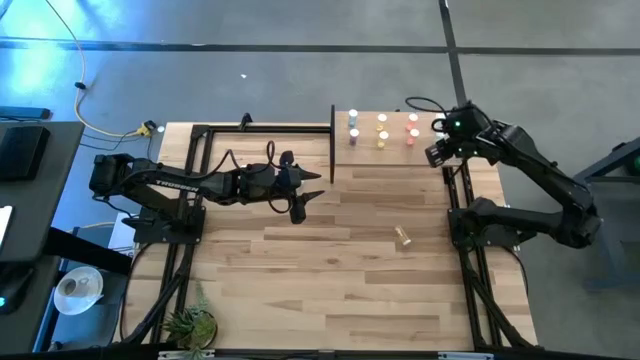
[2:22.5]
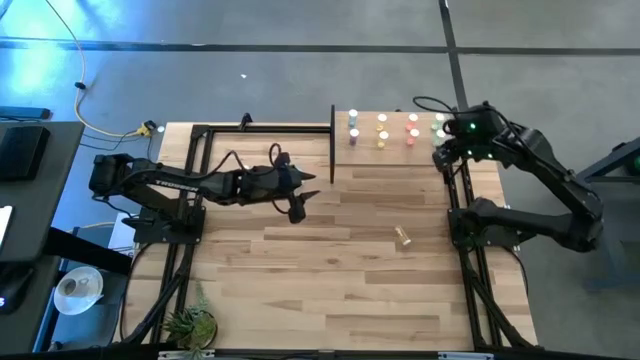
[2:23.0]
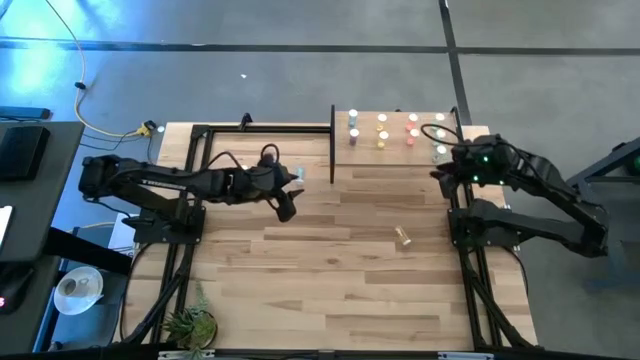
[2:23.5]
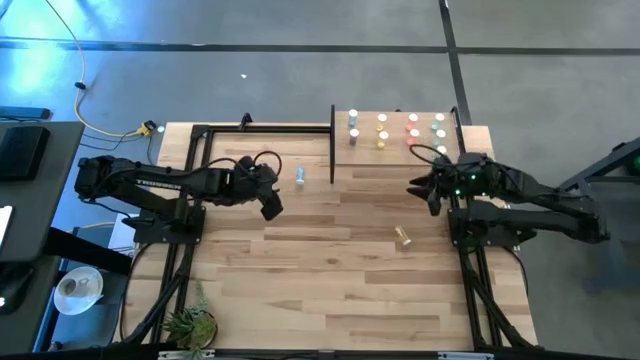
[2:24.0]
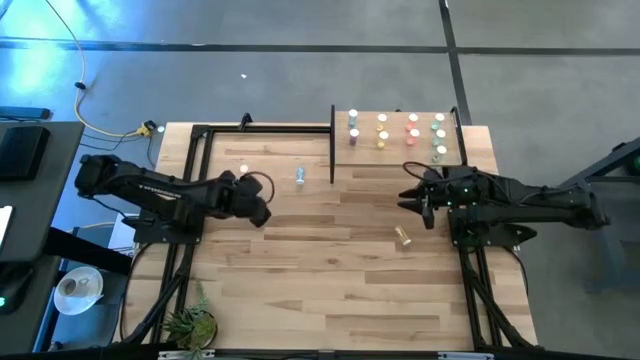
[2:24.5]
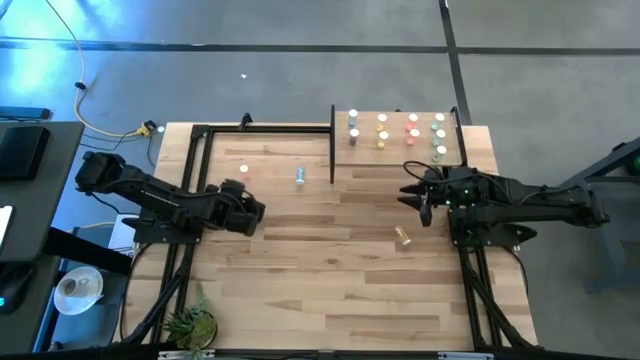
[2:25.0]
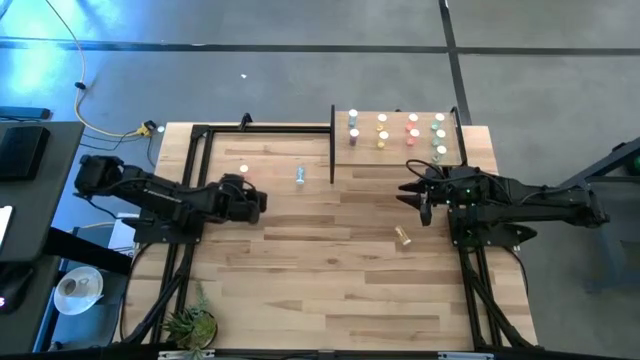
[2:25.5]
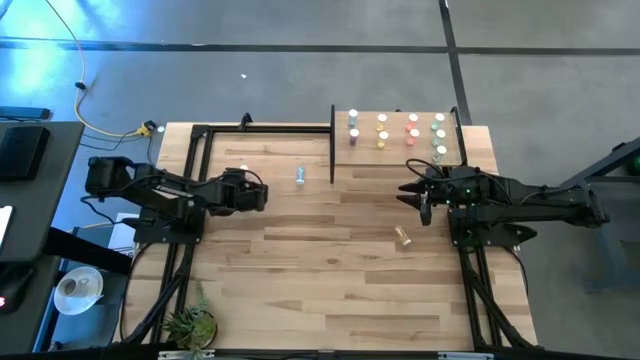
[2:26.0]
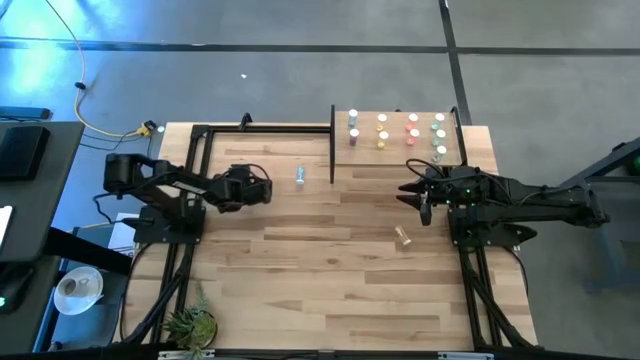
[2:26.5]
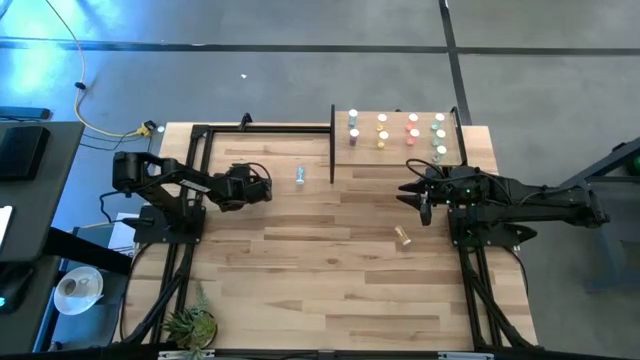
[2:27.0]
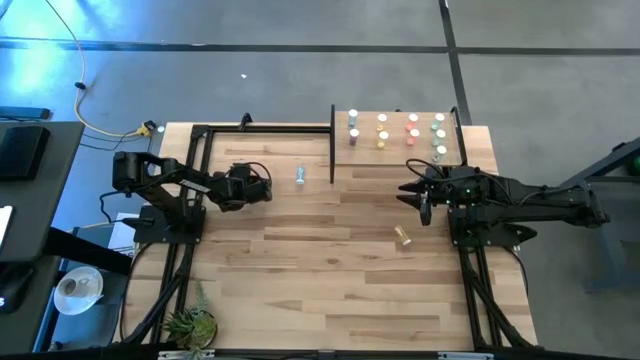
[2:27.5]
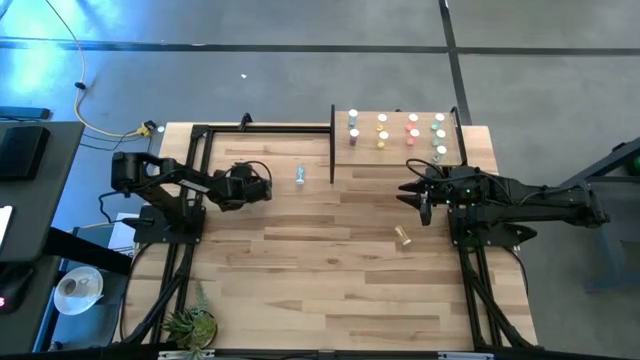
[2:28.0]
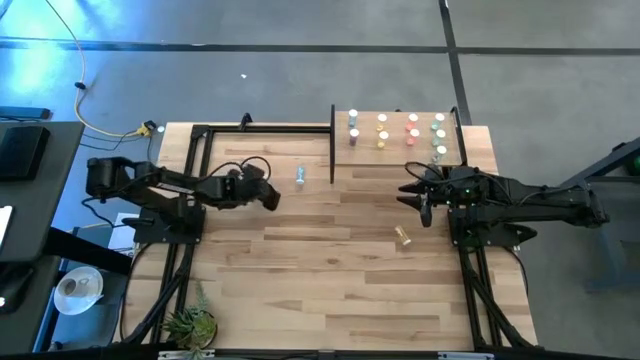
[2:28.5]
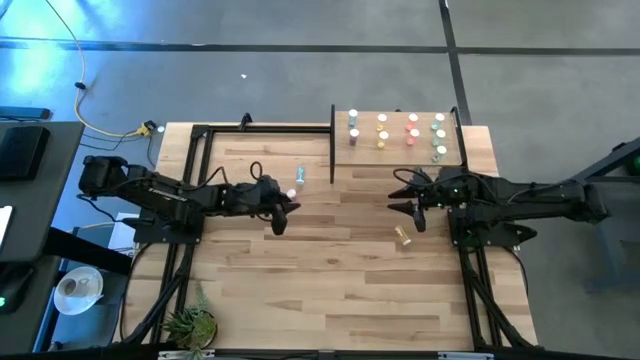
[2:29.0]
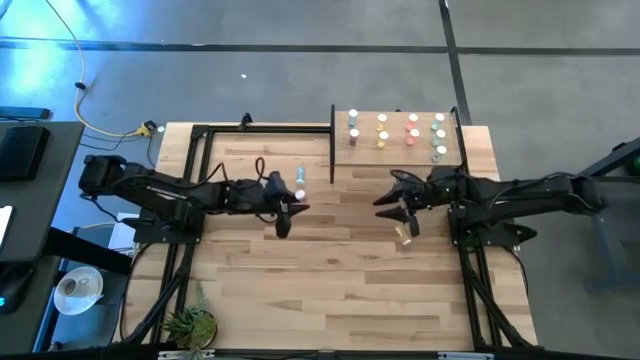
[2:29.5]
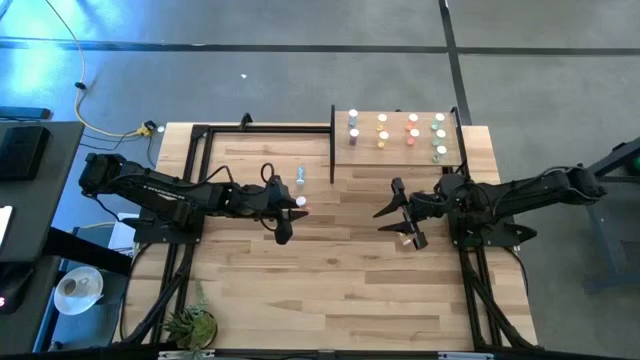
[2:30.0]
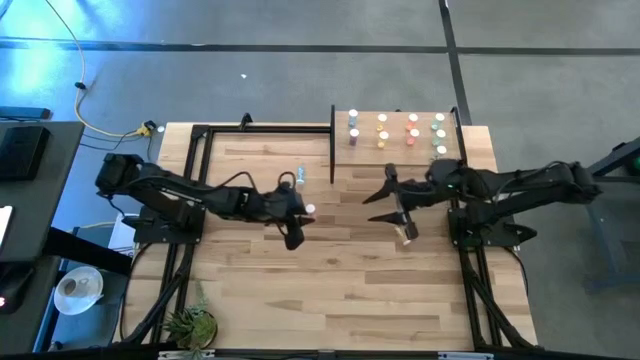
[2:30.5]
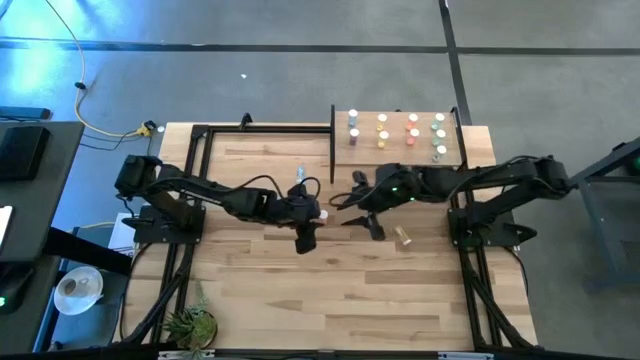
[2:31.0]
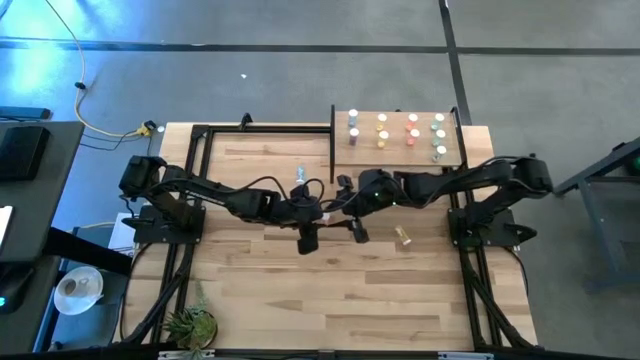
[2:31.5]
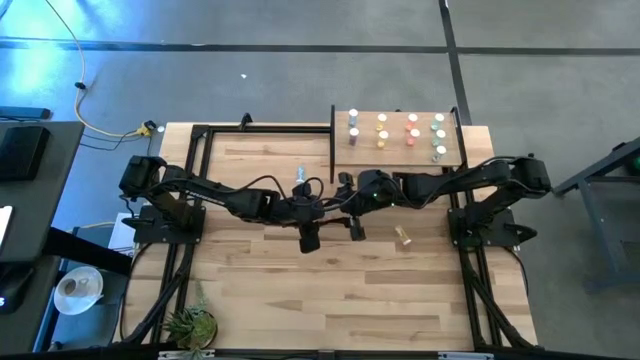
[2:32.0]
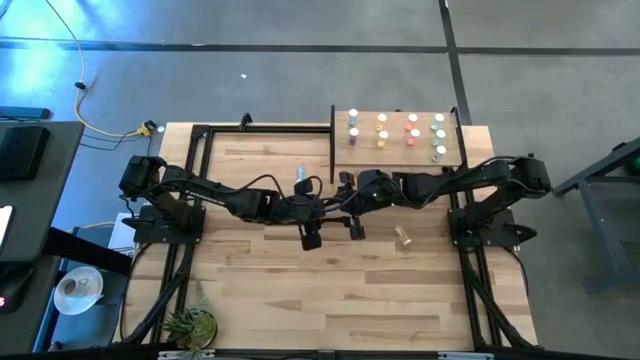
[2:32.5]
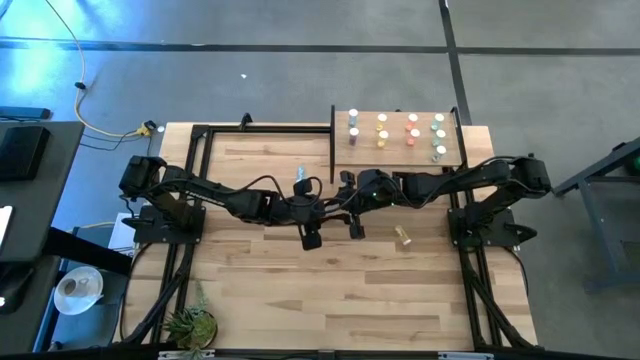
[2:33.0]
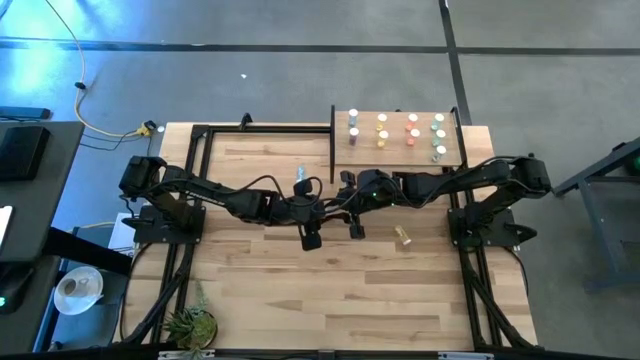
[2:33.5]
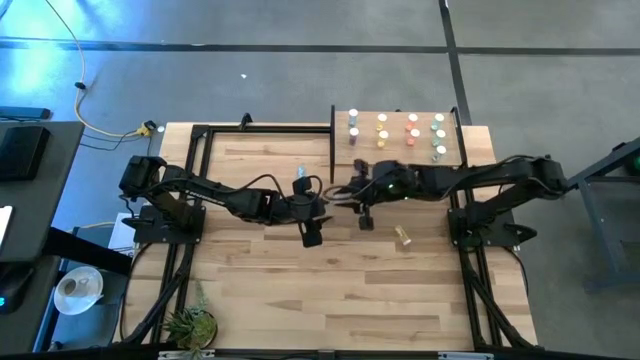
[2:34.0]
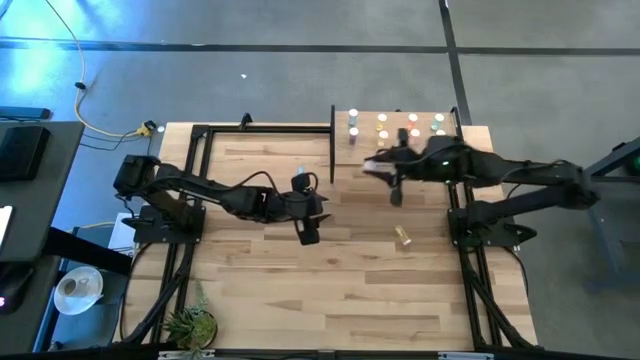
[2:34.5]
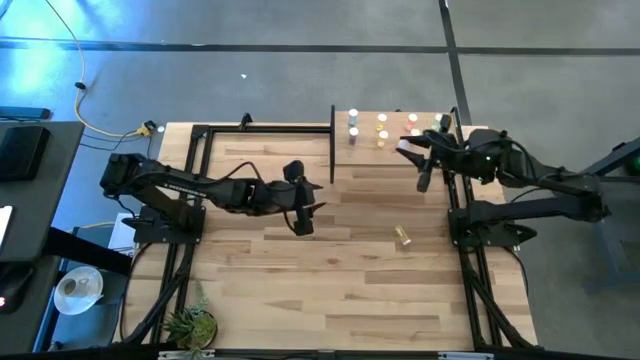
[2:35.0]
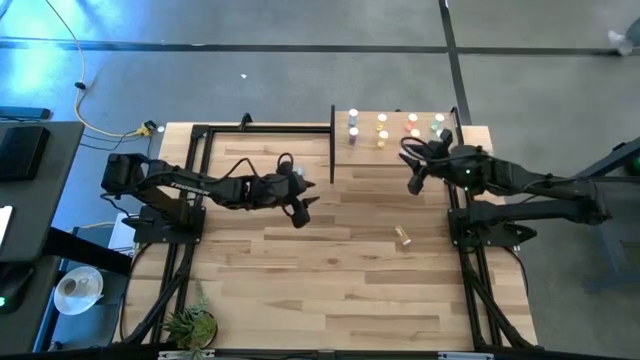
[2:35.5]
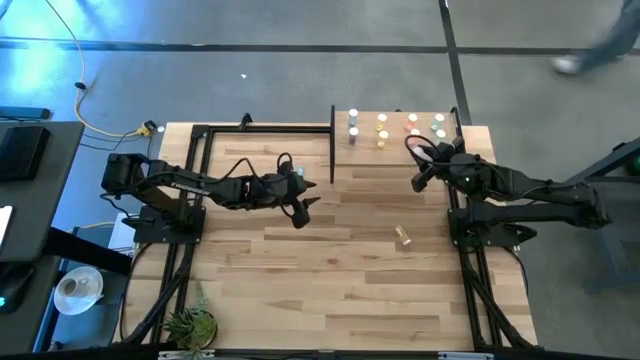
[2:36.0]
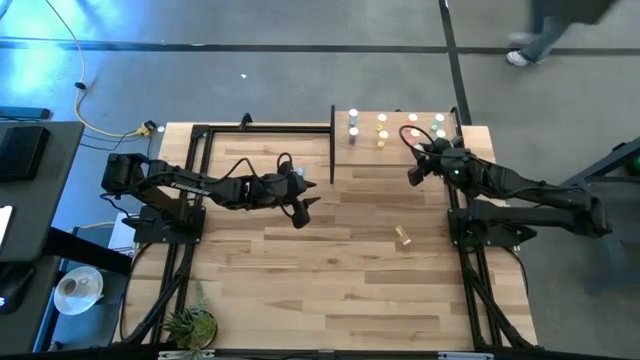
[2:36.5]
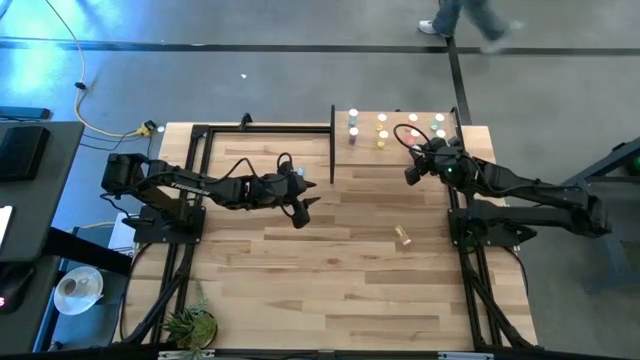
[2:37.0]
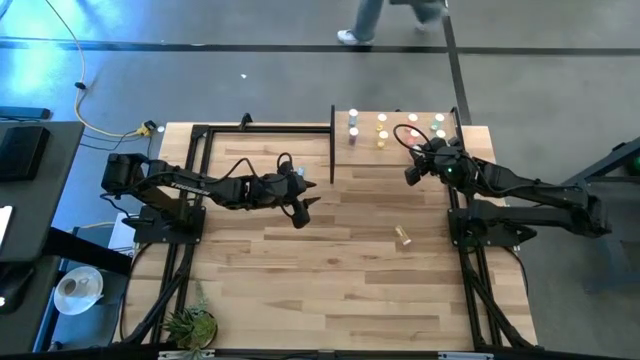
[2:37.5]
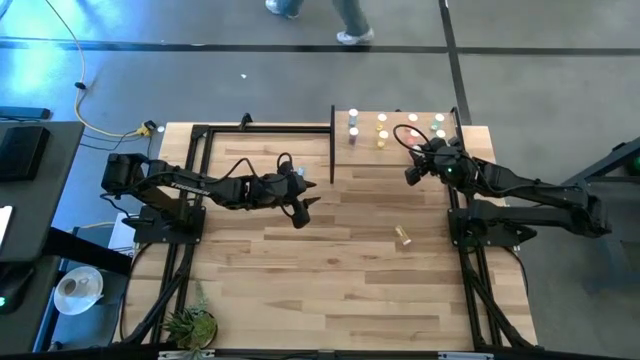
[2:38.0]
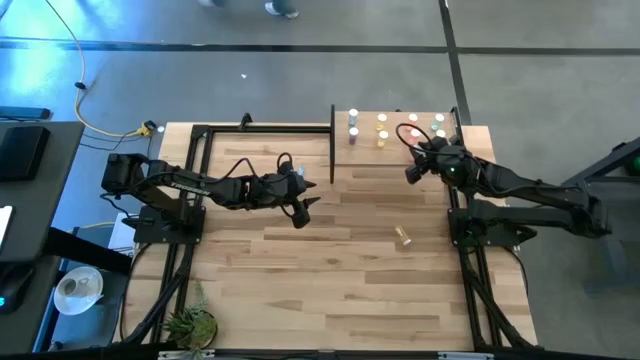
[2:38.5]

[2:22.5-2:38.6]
Task: Pick and place medicine bottles onto shelf by color
Put the pink medicine bottle aligned with the other pink medicine bottle on the shelf

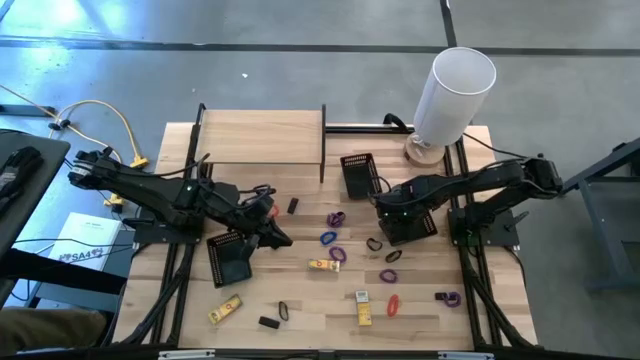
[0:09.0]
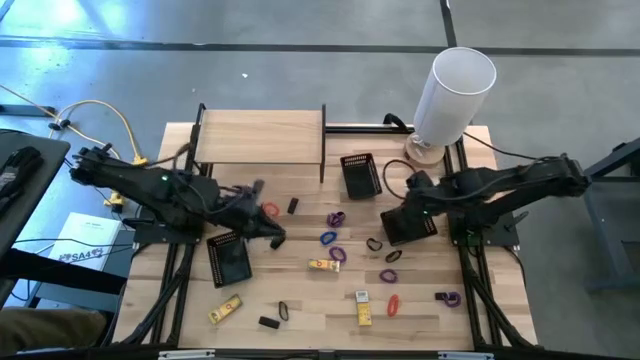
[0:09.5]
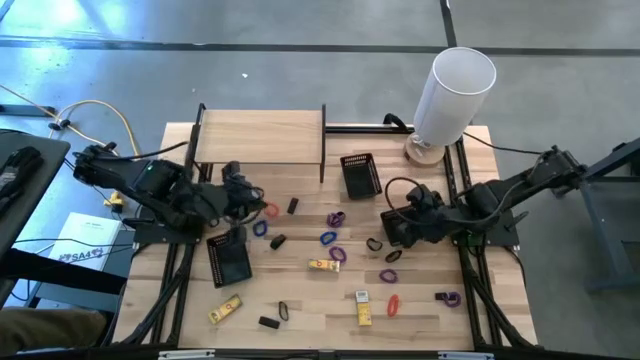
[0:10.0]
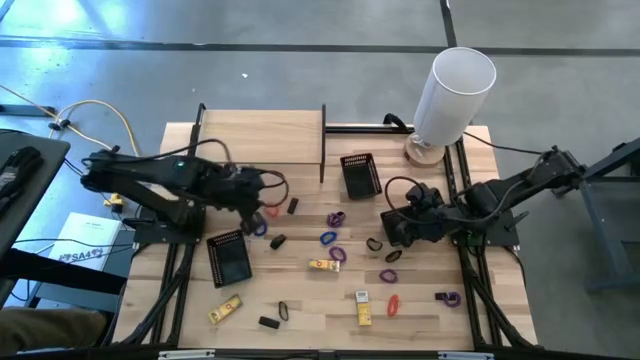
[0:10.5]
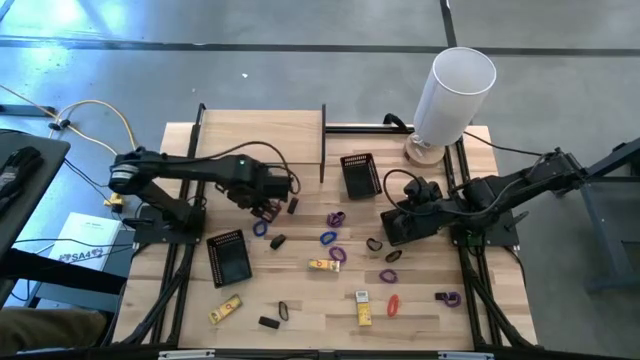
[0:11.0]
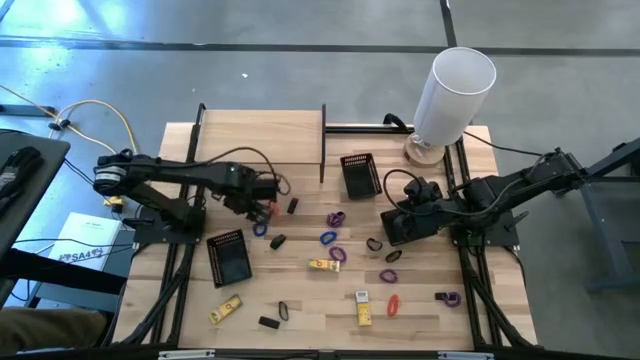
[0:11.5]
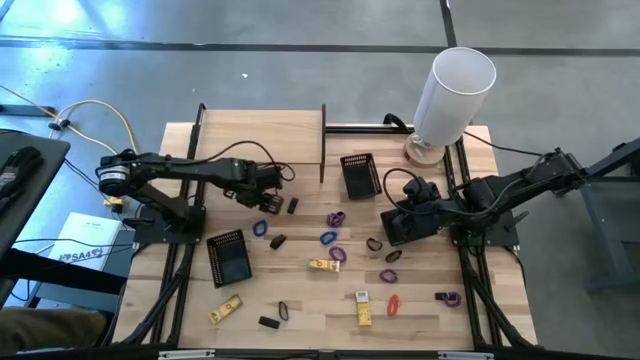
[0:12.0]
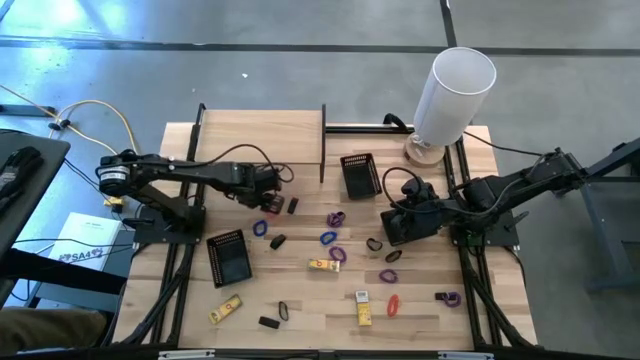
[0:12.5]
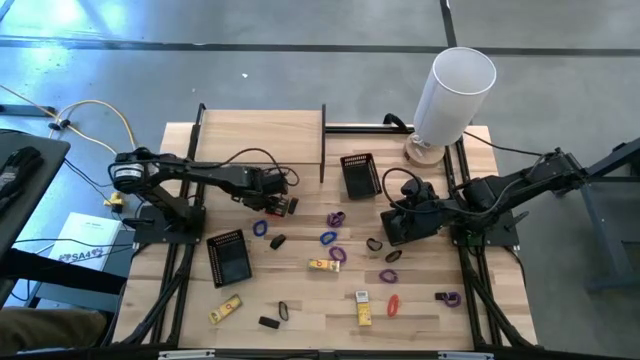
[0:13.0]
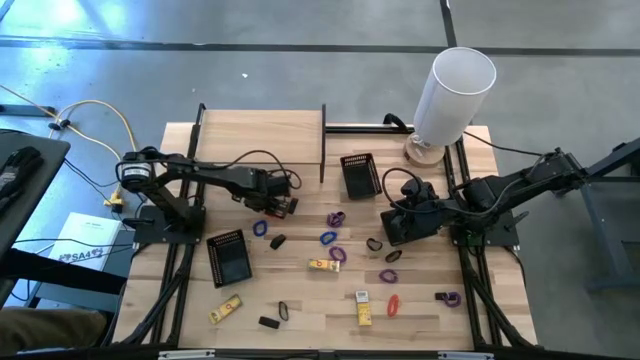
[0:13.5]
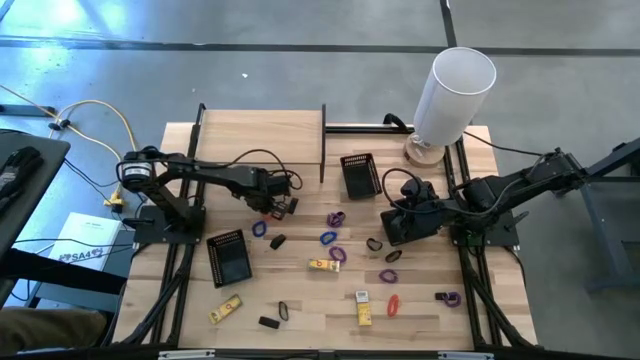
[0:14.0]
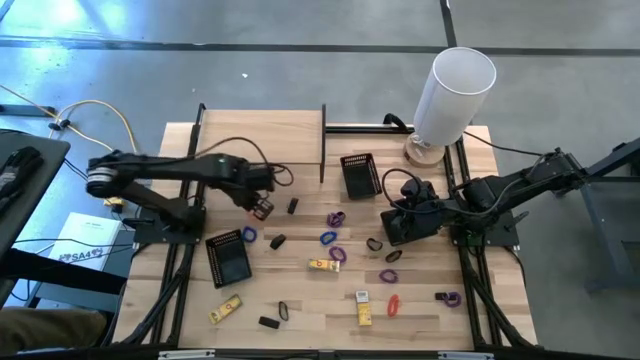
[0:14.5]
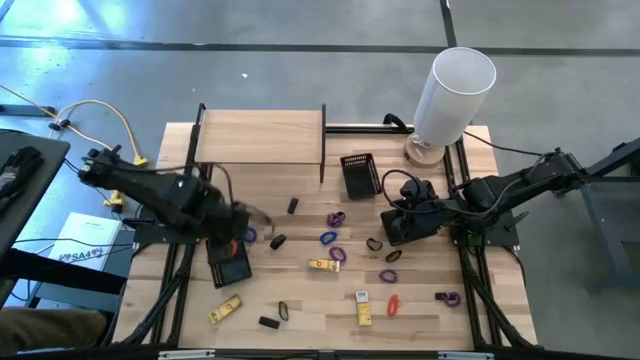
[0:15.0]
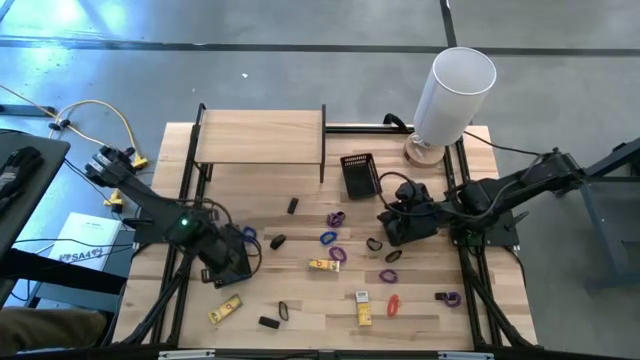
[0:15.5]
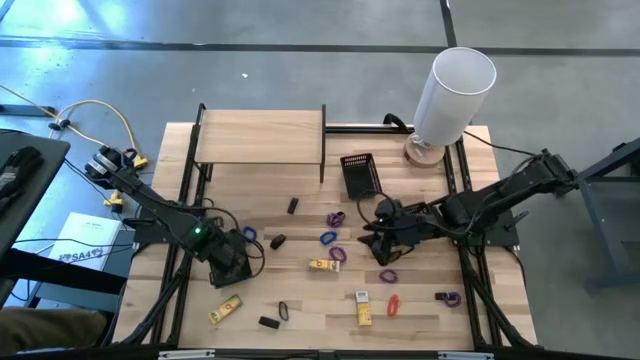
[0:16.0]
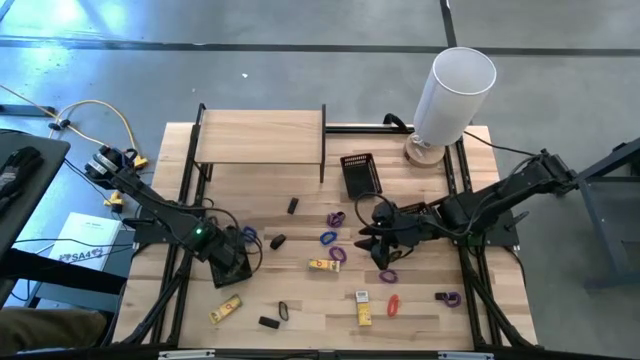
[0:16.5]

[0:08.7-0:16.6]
Task: Pick & Place Office Desk Supplies
Put the orange spring keychain into the bottom left black bin
